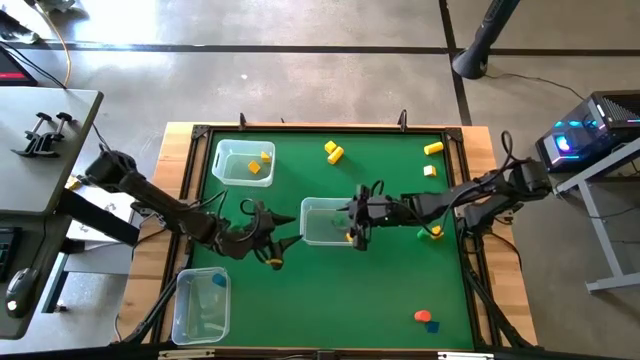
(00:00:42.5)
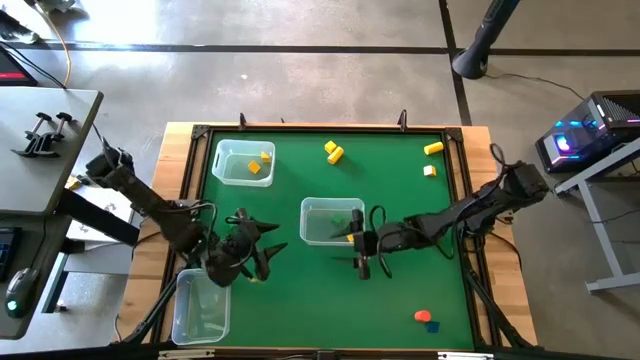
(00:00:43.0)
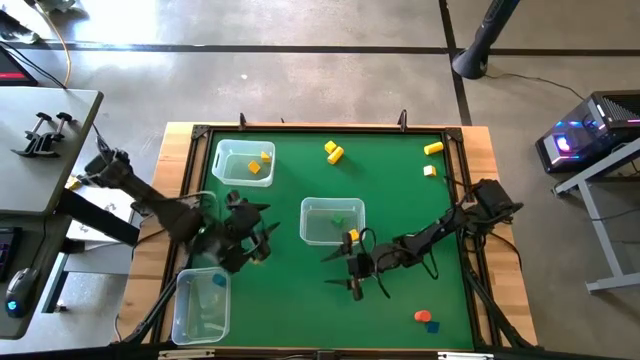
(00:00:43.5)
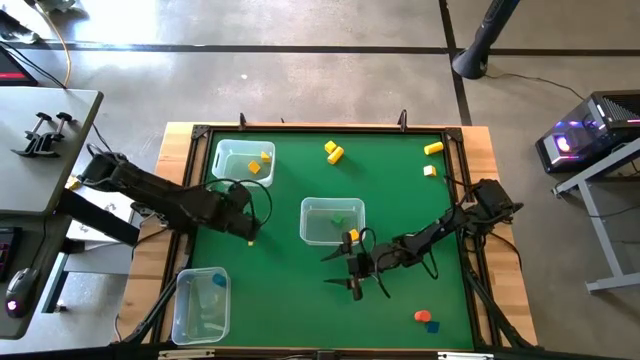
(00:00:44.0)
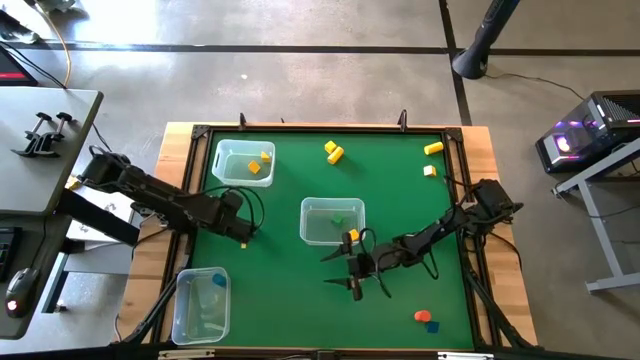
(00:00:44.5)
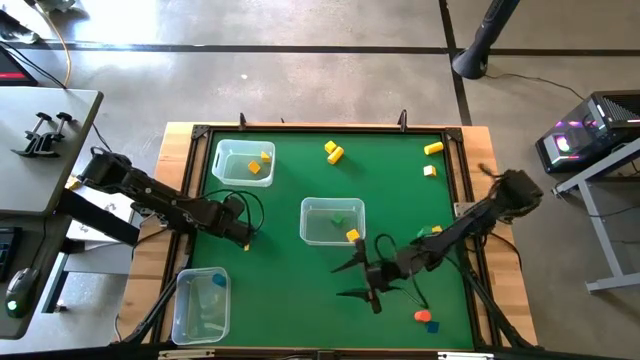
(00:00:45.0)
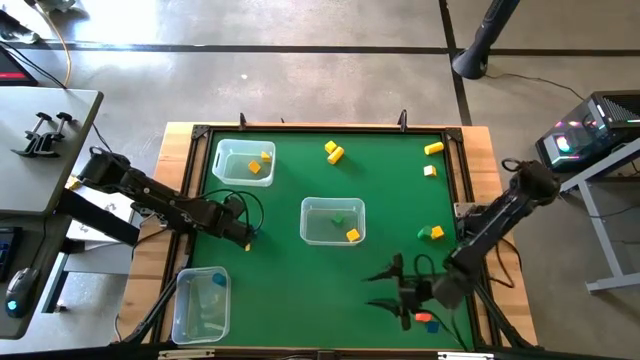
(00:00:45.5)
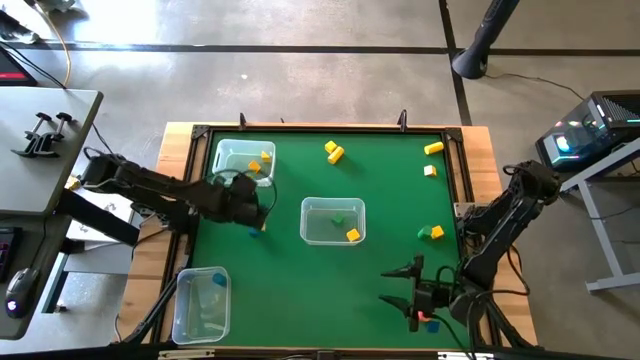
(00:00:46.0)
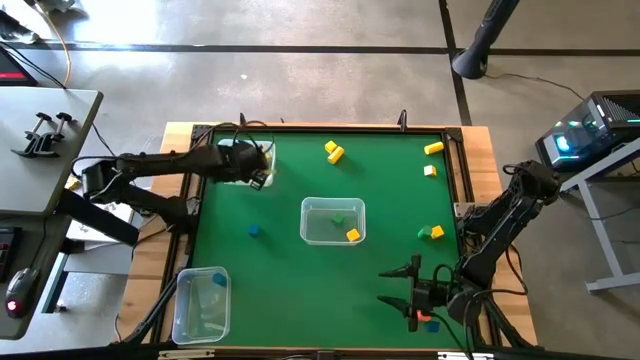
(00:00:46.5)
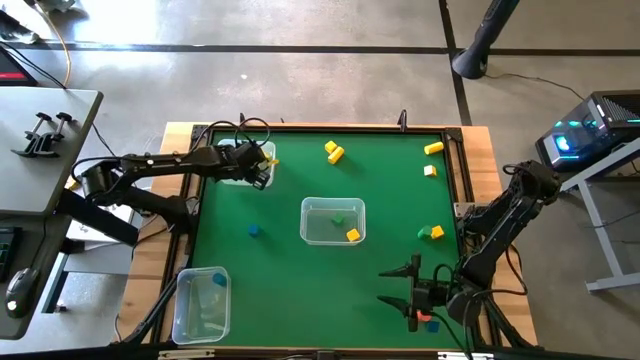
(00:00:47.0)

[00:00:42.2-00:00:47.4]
Task: Sort blocks by size
Put the green triangular block into the top left transparent bin

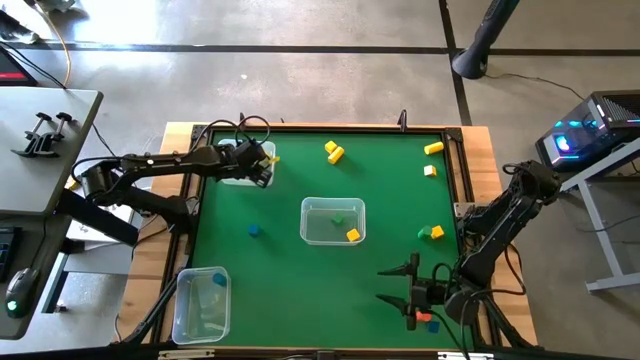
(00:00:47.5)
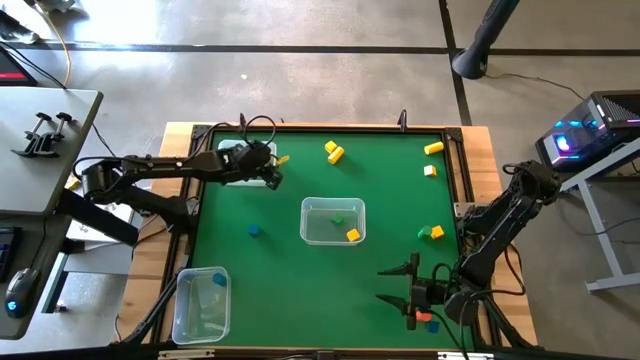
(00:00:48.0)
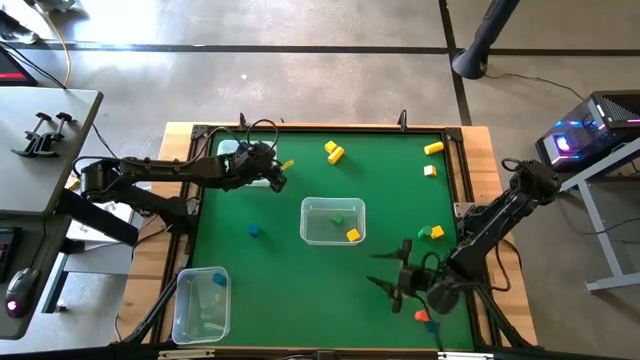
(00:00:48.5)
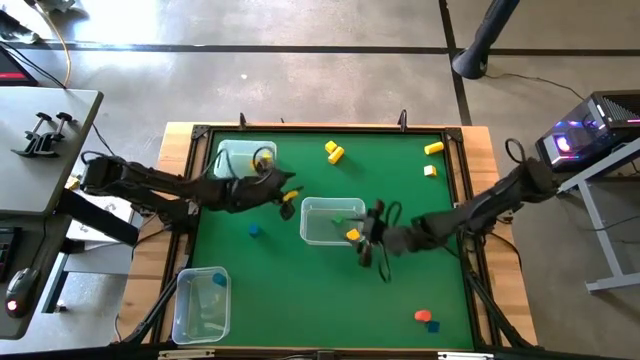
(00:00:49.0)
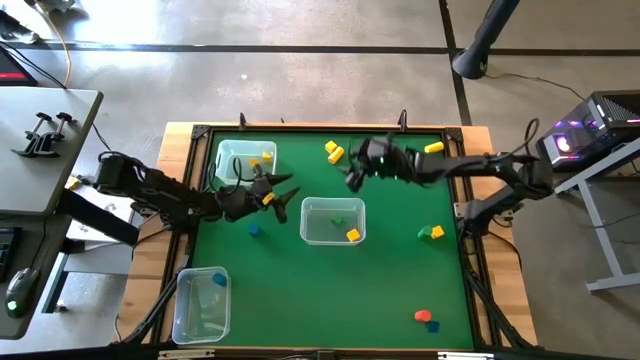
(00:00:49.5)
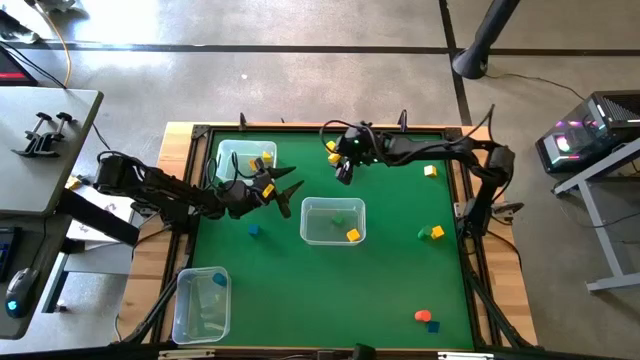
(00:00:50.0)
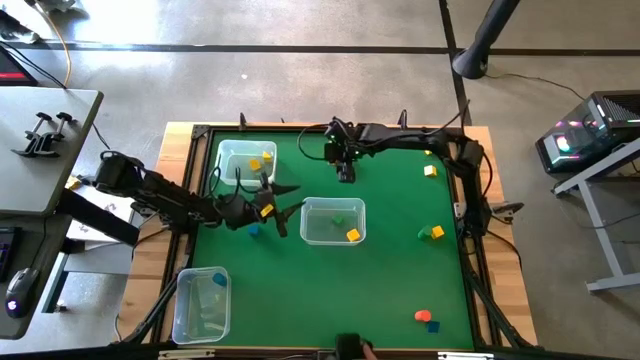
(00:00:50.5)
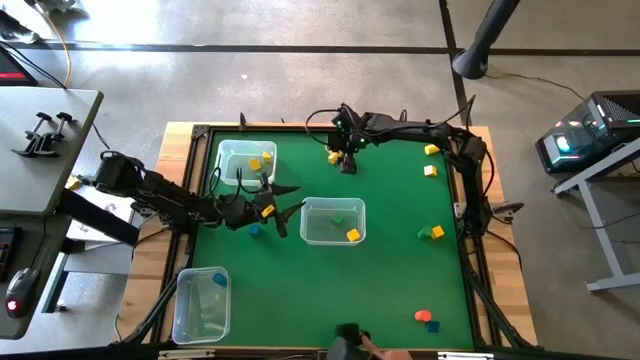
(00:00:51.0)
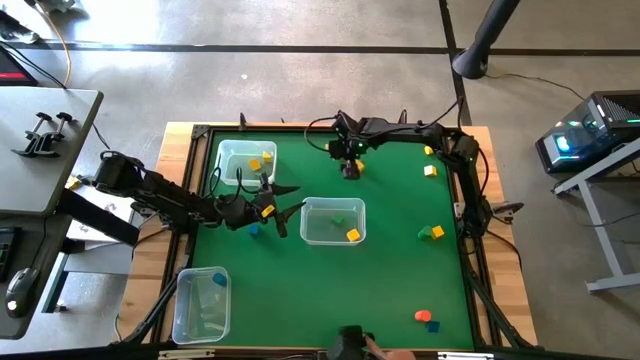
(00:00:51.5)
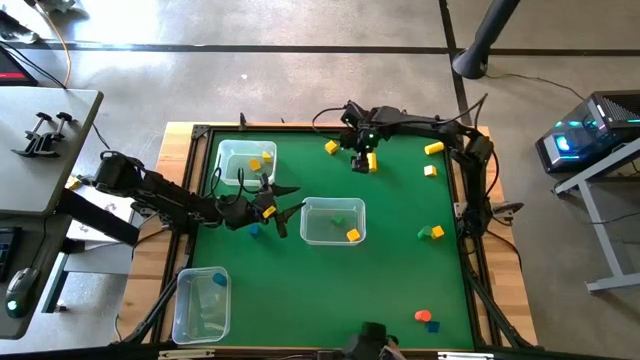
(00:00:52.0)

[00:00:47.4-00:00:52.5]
Put the yellow cylindrical block into the bottom left transparent bin

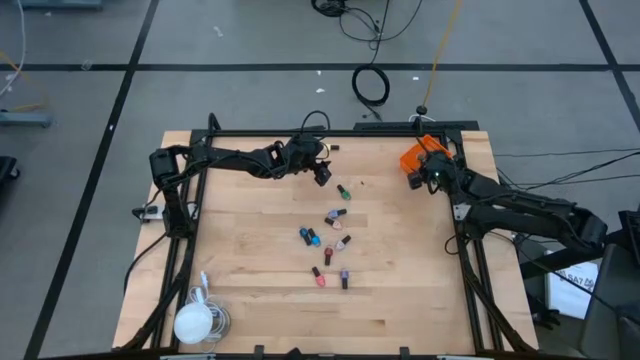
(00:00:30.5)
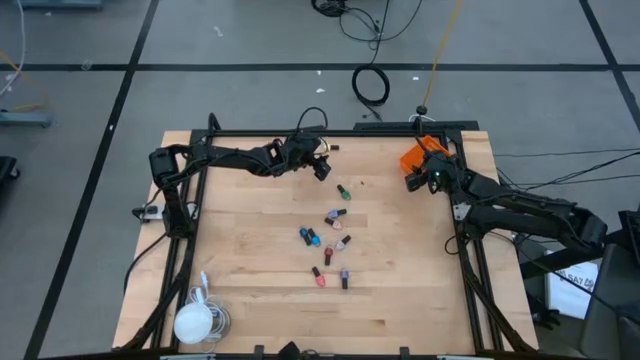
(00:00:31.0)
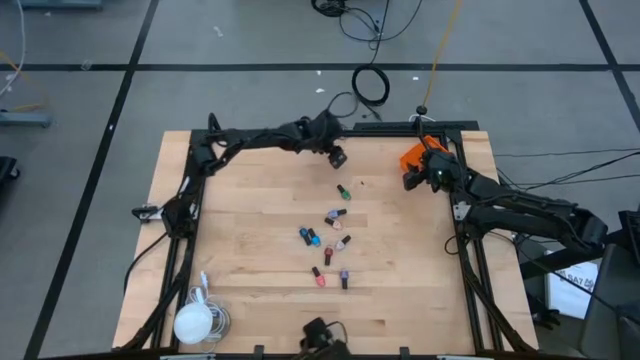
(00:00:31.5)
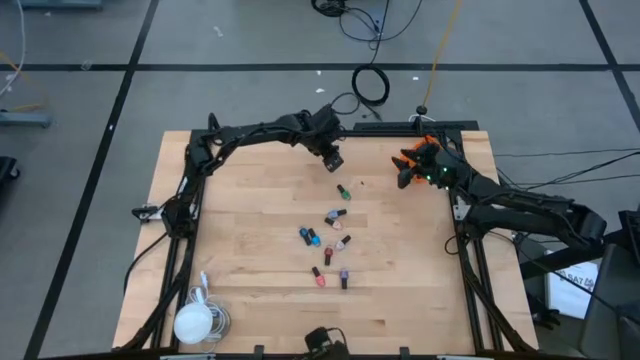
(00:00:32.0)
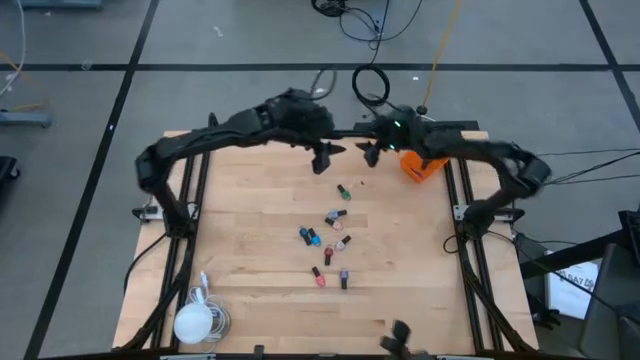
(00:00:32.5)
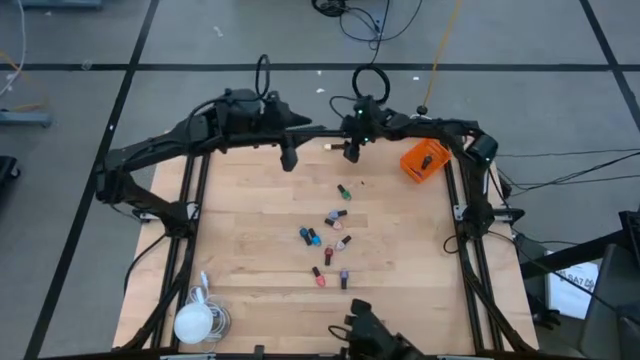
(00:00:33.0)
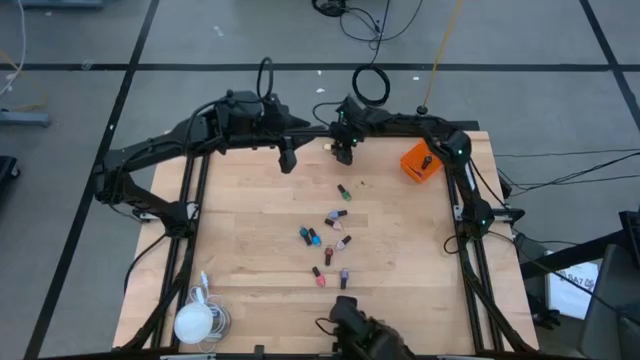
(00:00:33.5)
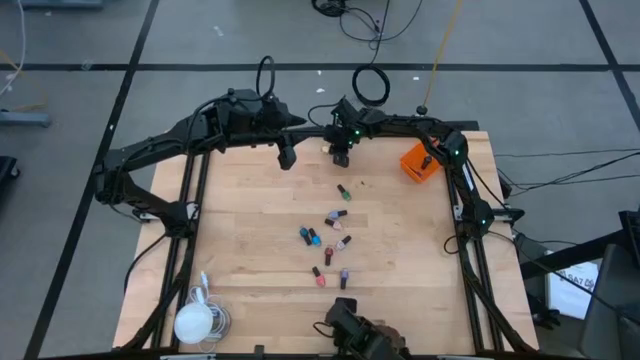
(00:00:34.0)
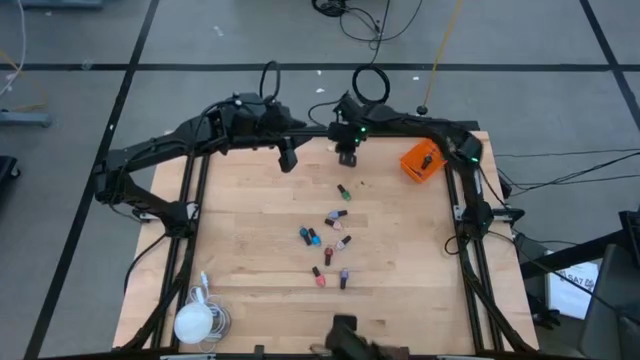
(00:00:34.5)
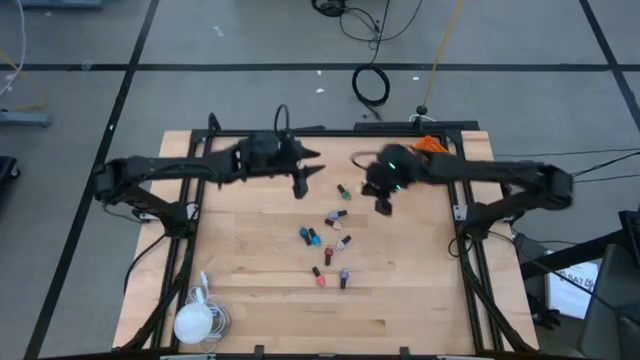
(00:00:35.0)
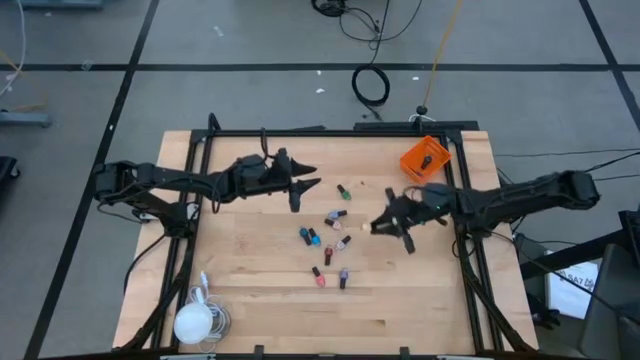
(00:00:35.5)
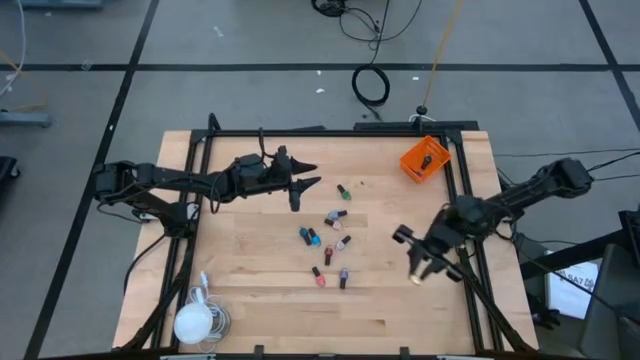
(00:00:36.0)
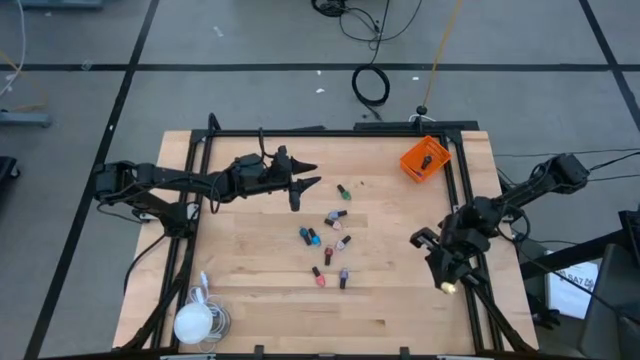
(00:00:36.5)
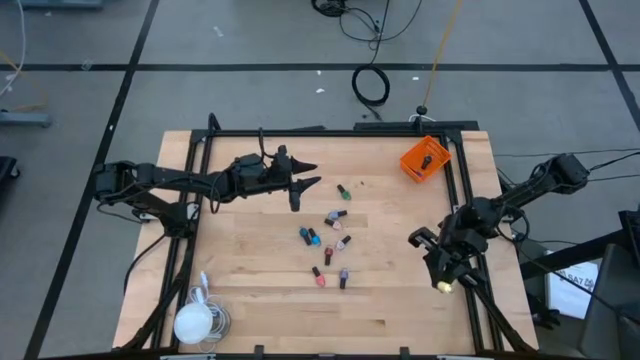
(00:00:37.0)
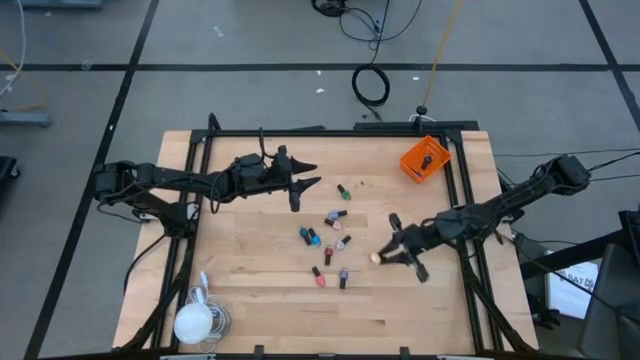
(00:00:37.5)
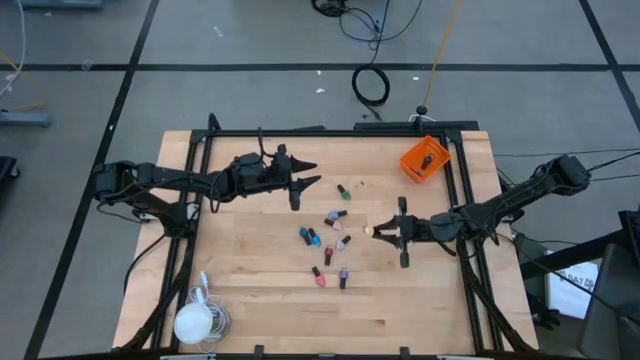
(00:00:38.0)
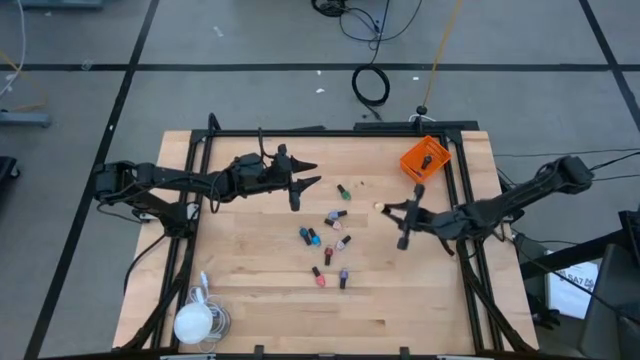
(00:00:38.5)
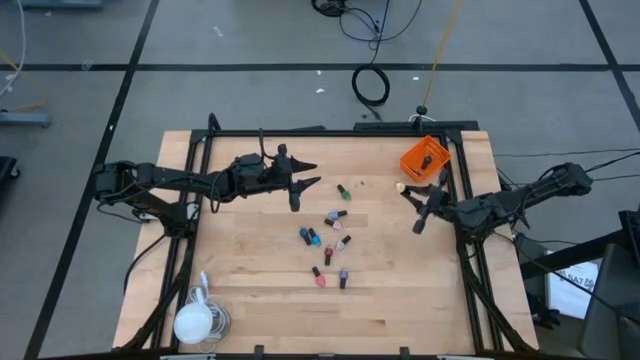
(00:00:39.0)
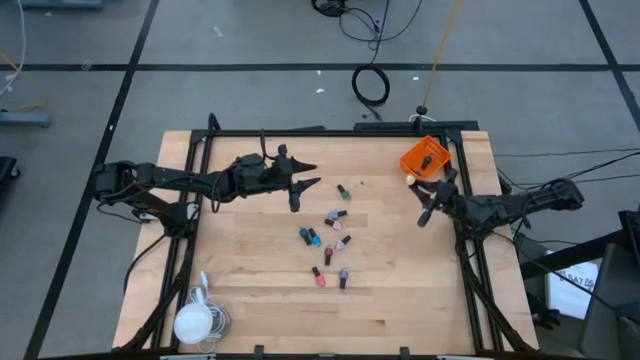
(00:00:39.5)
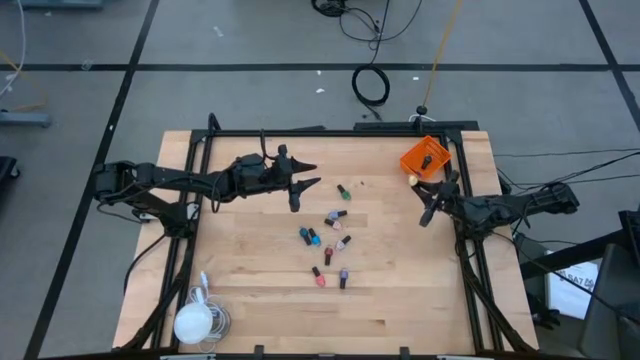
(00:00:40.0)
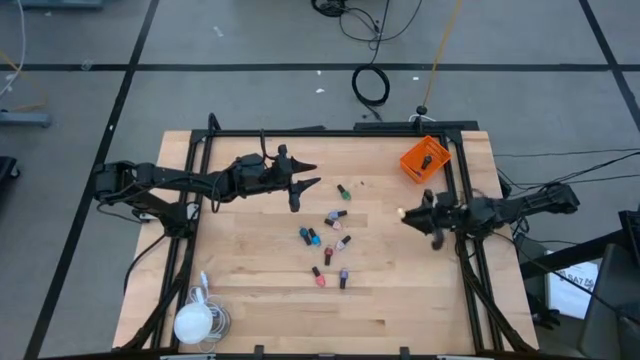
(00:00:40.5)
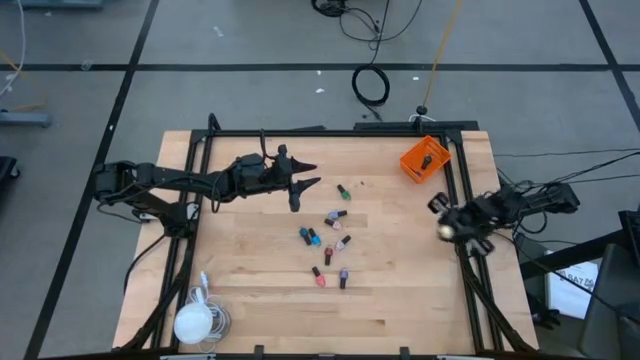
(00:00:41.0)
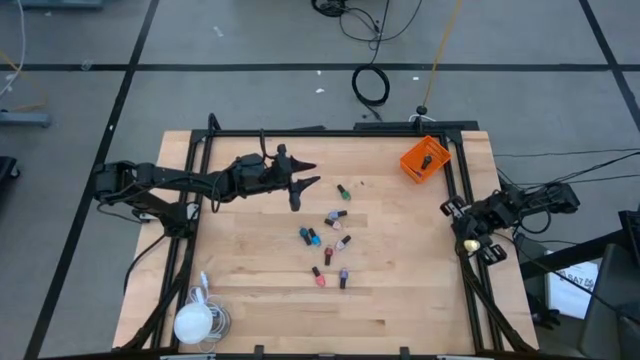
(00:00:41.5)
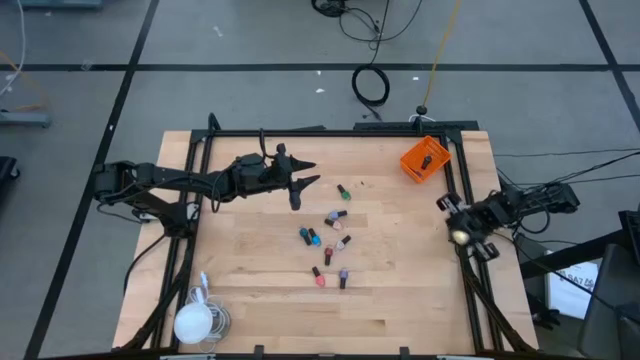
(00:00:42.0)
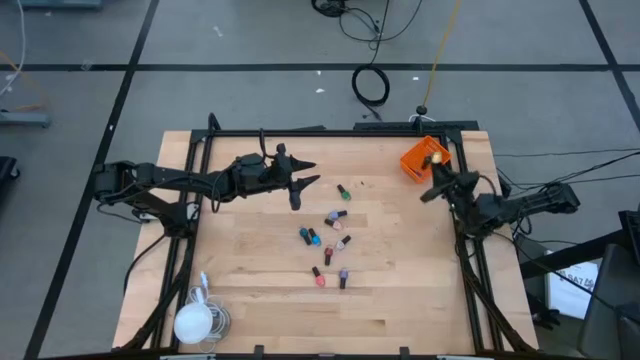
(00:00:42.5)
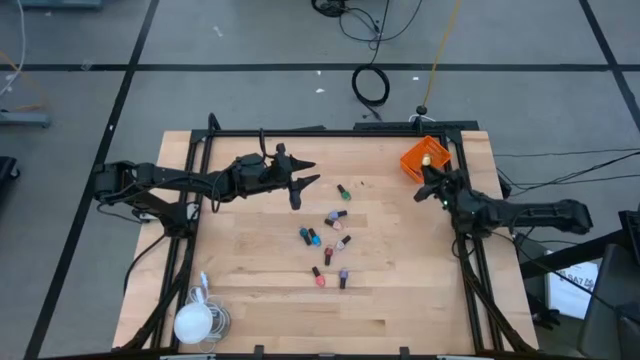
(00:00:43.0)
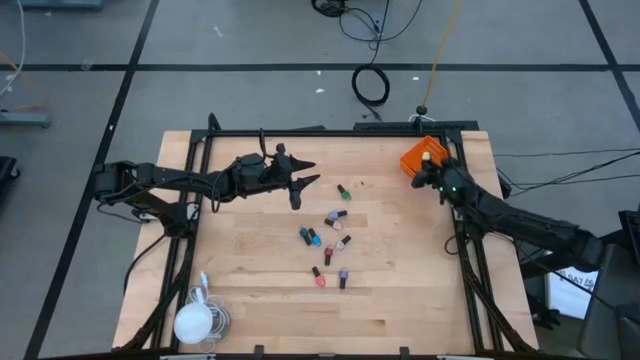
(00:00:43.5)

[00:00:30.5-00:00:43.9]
Task: Pick & Place Nail Polish
Put the yellow nail polish bottle into the orange basket
